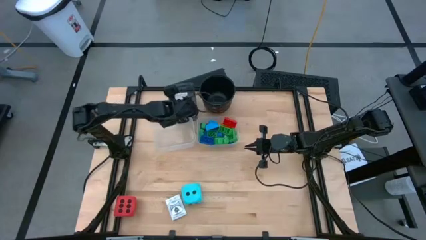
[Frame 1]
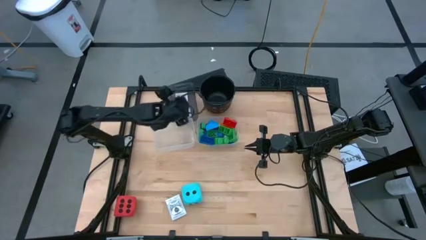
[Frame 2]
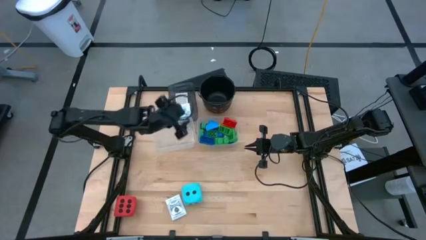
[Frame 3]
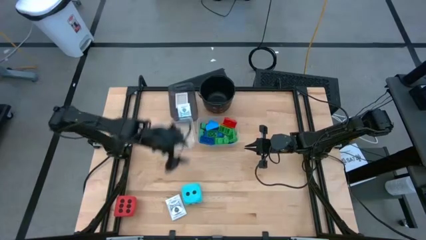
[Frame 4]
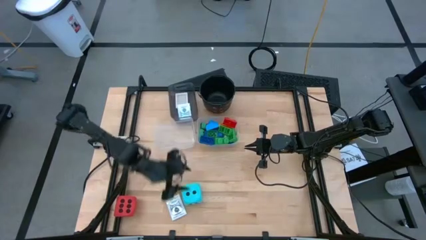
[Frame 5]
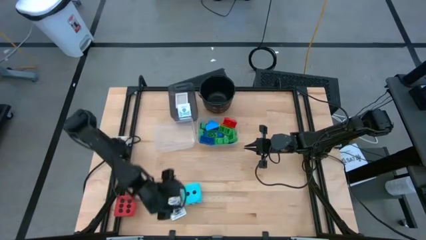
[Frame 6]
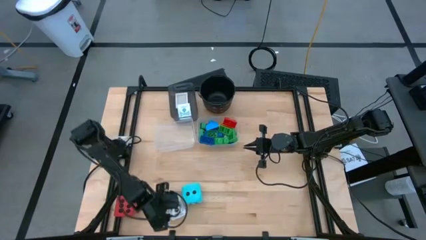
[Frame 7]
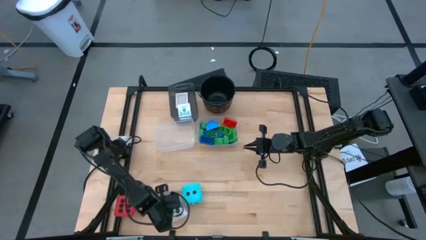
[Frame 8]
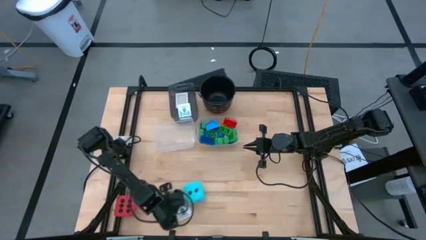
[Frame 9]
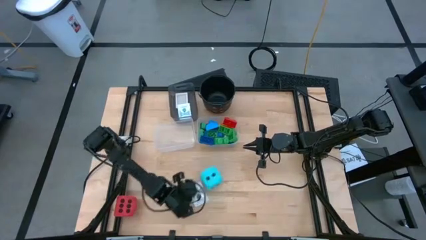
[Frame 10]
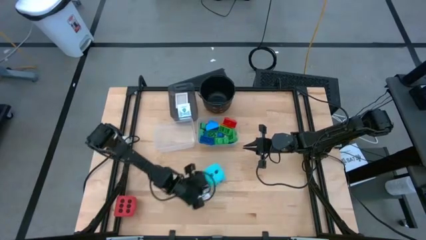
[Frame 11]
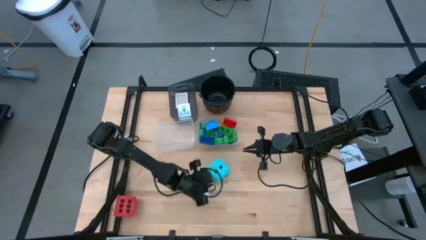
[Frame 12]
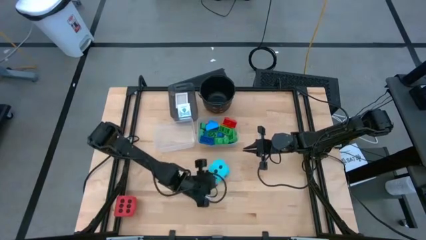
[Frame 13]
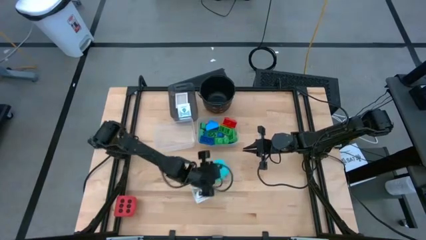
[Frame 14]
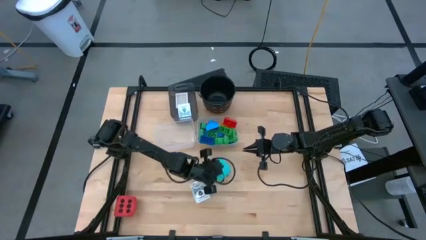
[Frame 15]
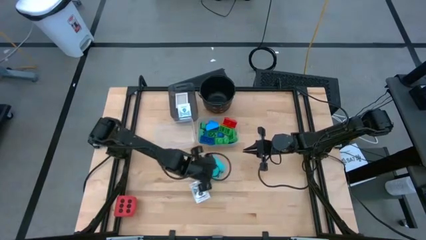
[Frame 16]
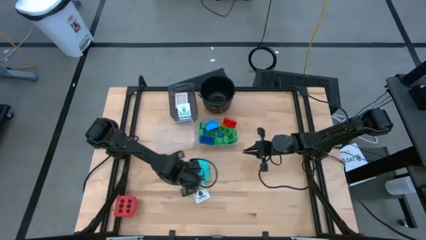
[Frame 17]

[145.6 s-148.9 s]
Task: Pick & Place Toys
Adjust the blue dice on the table

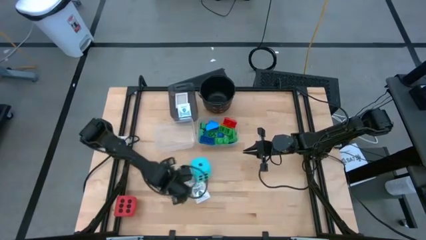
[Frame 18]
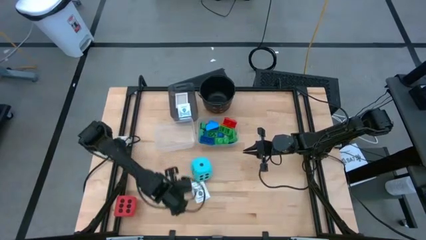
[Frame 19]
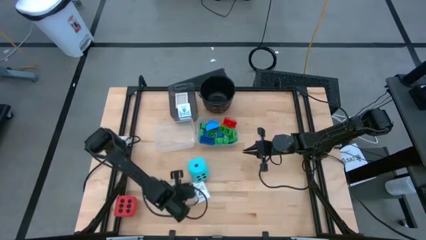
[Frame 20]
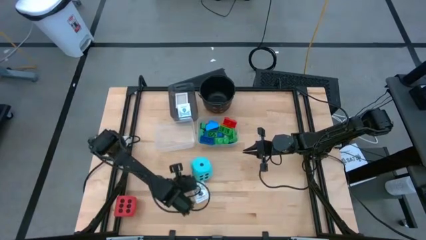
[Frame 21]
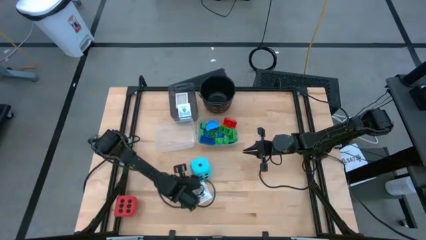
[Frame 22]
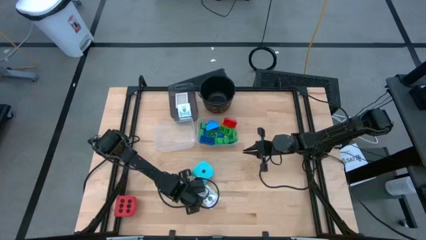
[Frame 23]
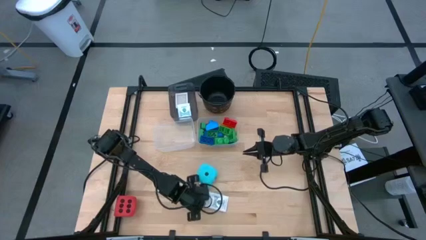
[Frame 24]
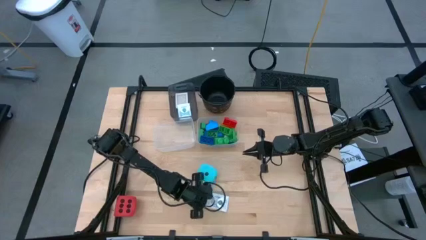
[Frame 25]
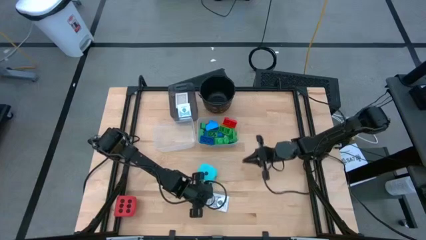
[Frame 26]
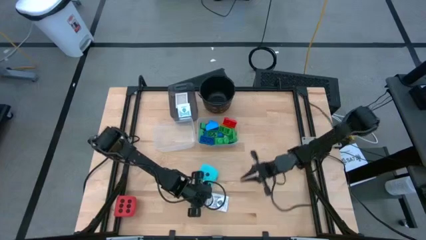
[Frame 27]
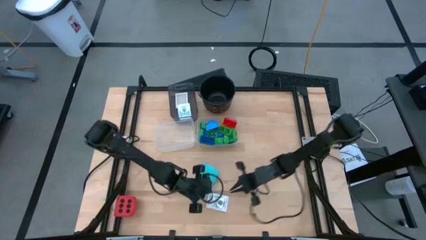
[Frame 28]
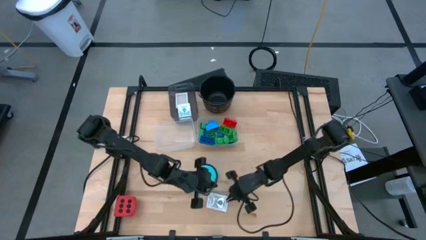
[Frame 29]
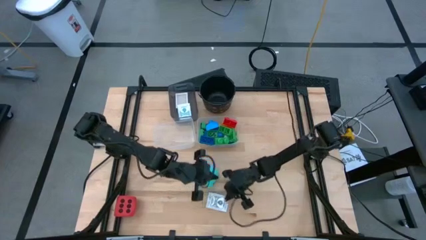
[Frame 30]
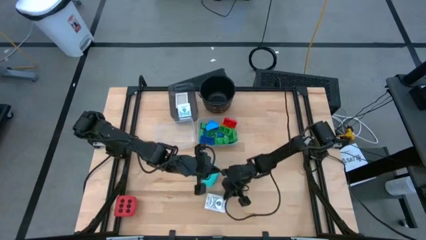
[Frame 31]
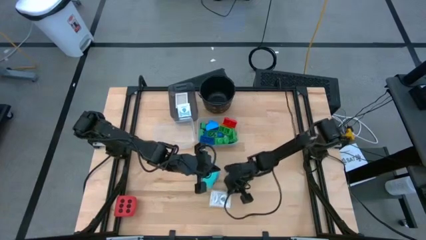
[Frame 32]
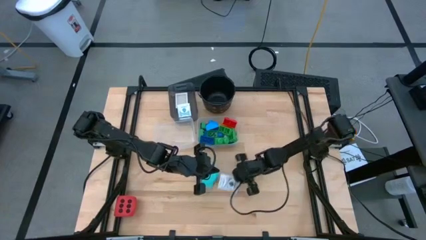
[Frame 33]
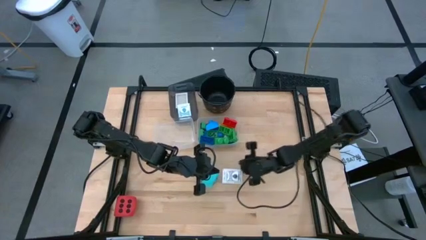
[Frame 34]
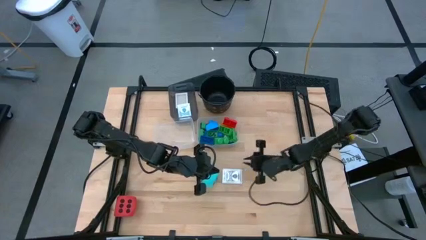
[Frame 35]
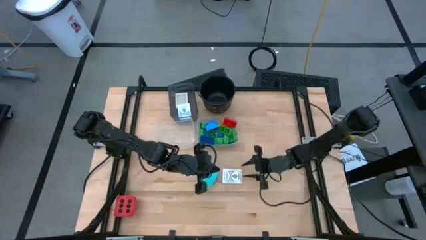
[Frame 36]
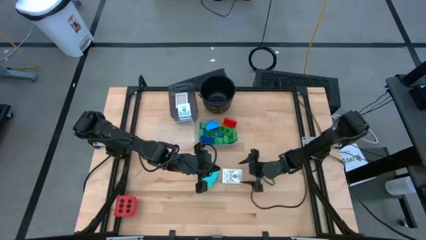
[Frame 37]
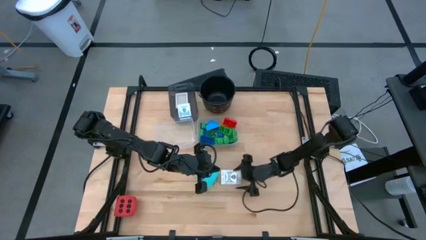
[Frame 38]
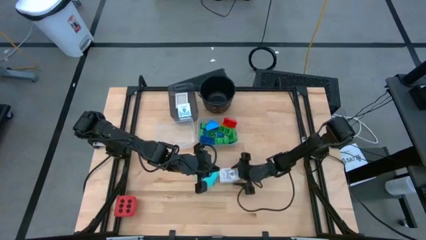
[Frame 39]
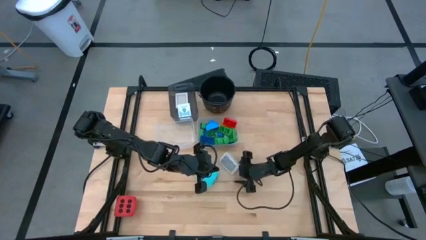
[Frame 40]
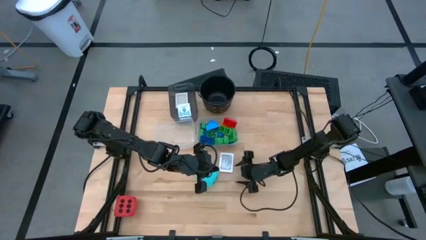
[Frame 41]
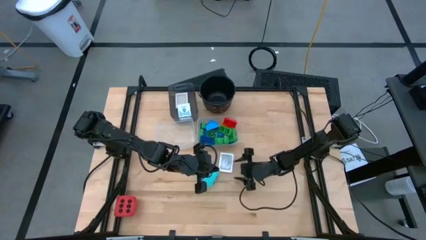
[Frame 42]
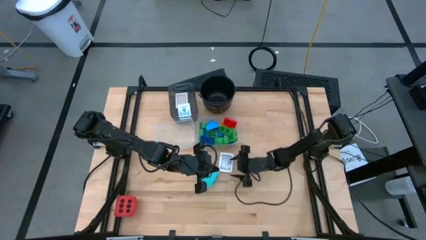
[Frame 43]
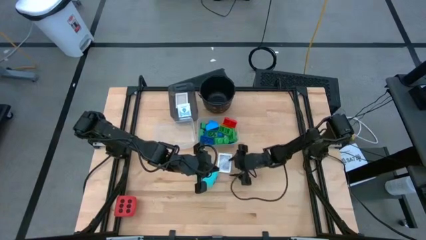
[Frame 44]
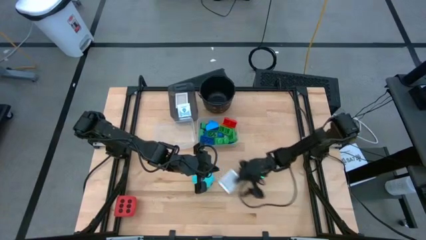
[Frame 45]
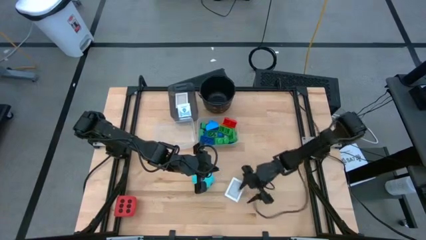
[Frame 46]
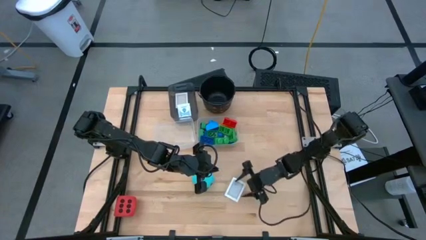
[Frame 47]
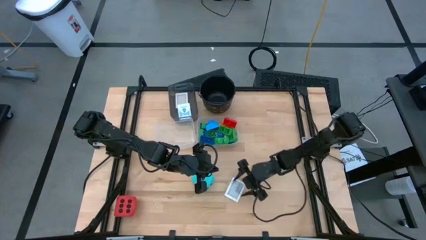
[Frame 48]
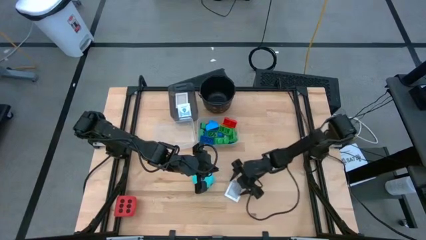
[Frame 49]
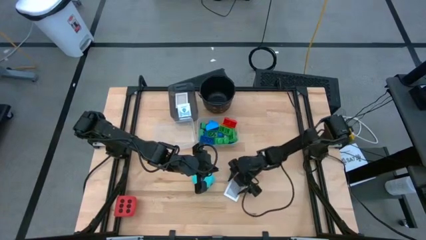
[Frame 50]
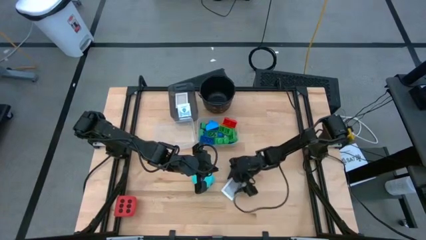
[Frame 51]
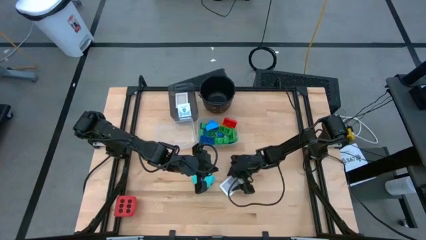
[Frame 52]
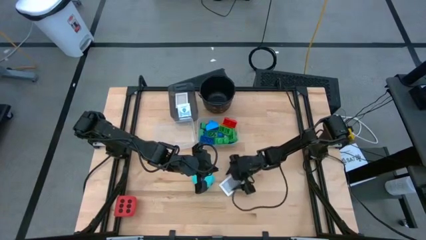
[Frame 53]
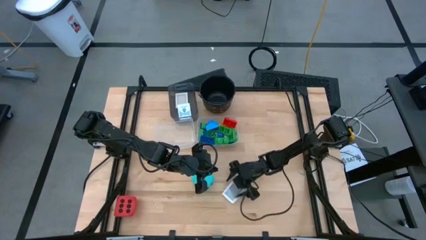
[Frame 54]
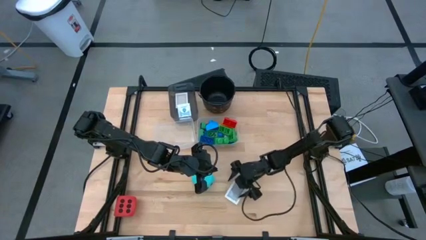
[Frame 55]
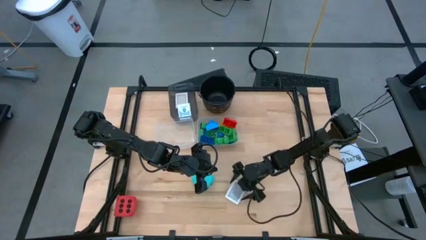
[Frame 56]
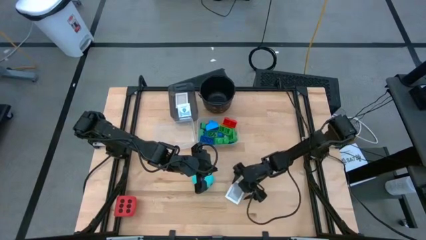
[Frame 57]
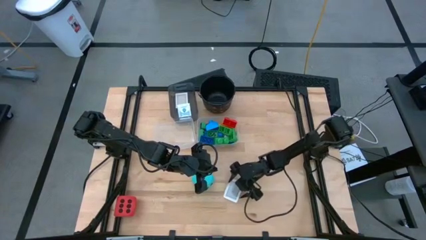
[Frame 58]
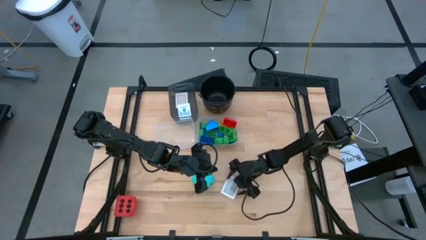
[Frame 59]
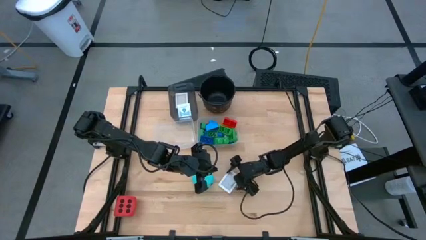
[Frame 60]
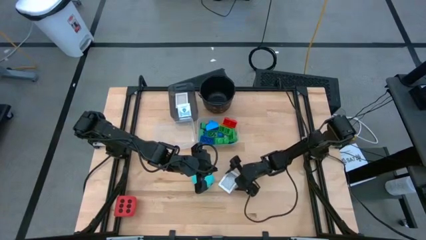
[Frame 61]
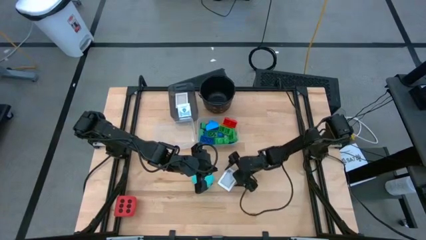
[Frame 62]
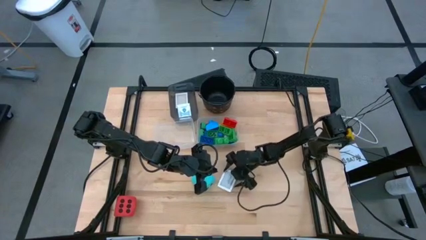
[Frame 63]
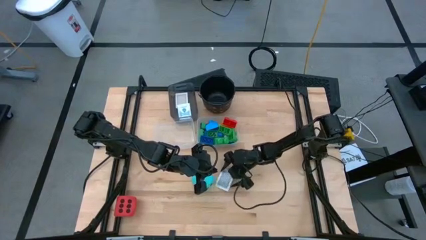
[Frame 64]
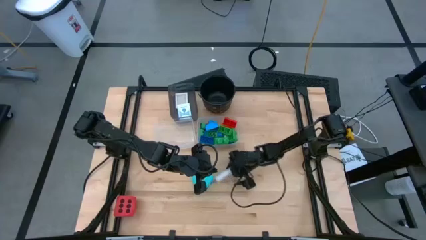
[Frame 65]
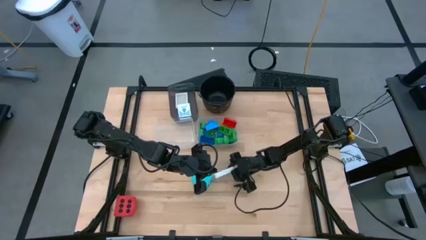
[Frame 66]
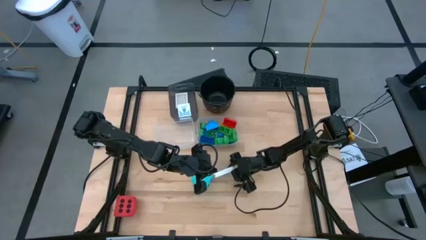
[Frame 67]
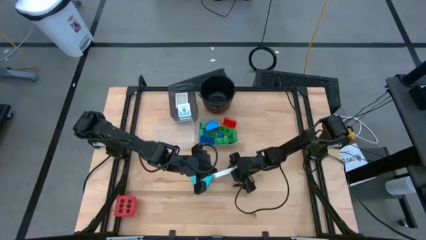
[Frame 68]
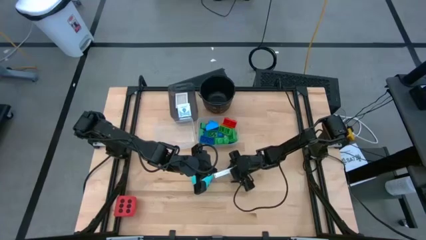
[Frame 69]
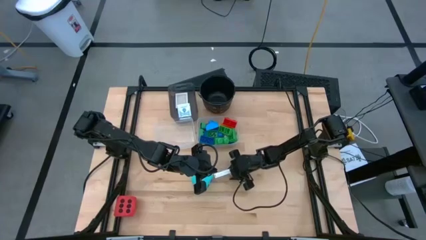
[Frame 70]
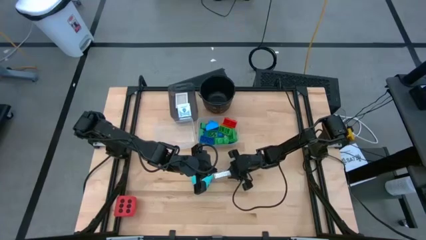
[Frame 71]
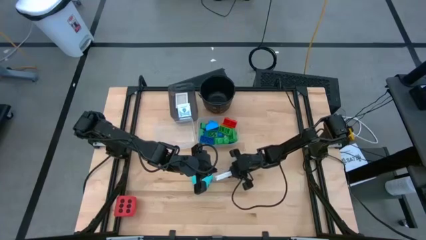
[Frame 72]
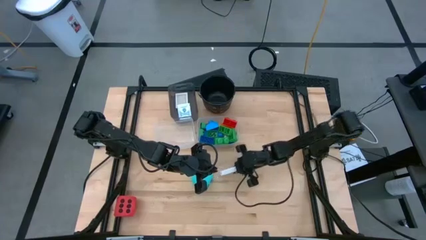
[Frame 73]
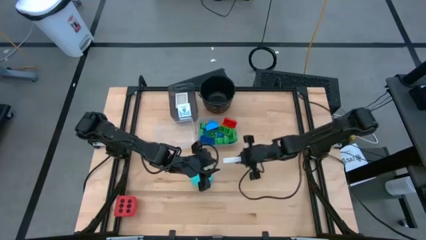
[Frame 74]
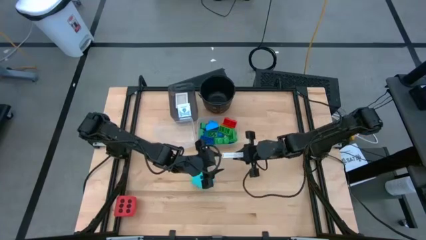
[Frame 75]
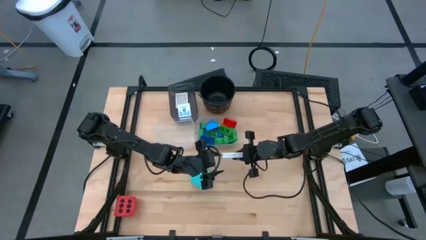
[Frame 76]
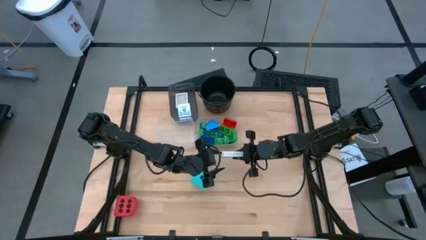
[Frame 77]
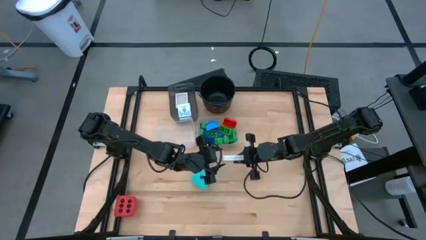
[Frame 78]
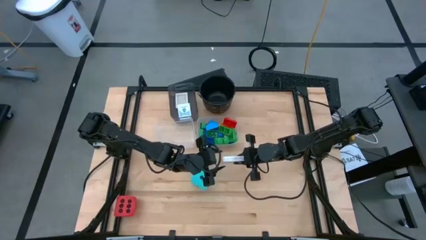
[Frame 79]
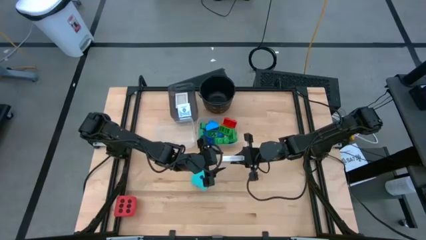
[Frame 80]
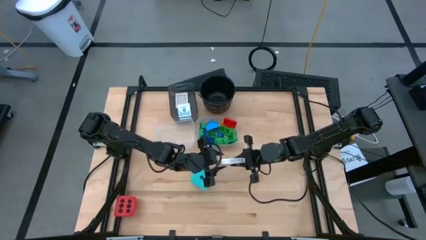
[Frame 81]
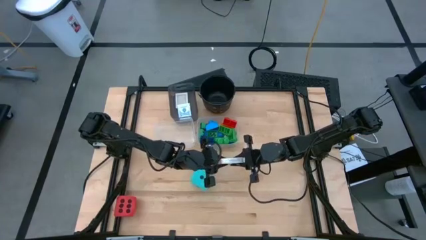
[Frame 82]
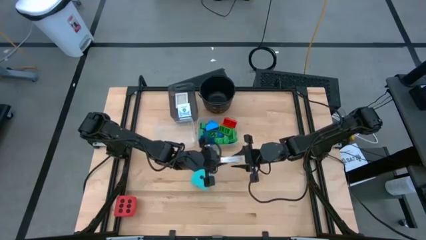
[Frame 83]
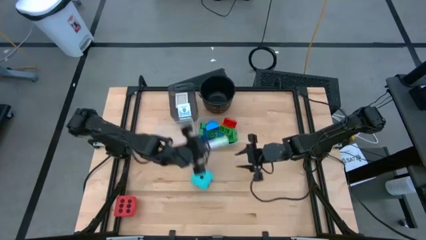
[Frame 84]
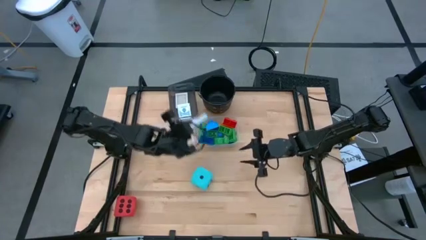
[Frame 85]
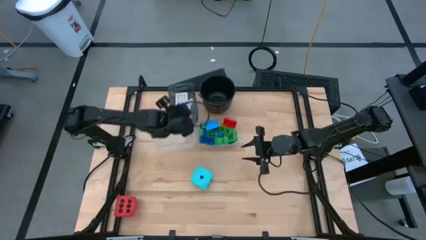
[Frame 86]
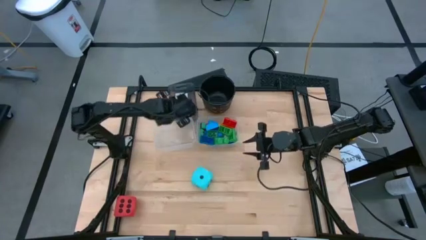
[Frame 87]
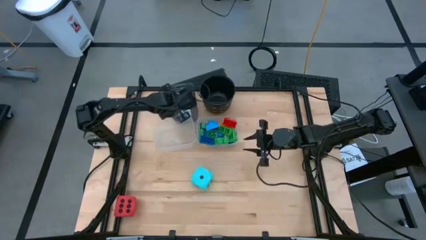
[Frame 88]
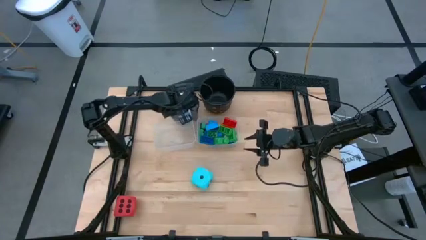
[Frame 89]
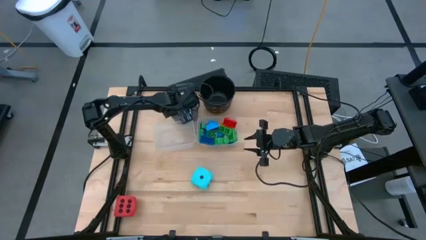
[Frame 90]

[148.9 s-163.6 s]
Put the black card box into the black bin
